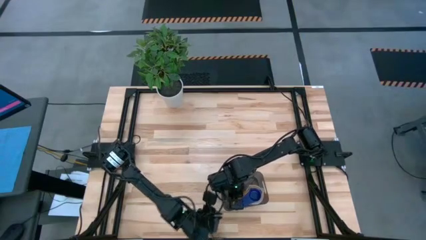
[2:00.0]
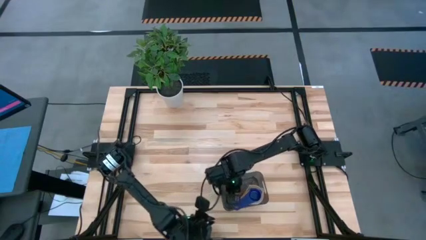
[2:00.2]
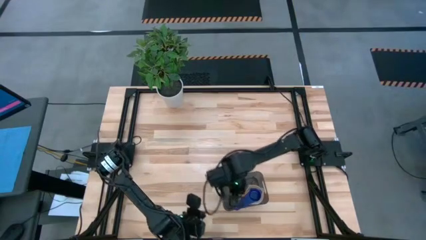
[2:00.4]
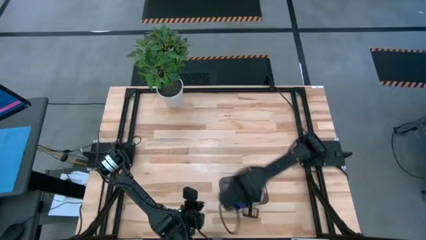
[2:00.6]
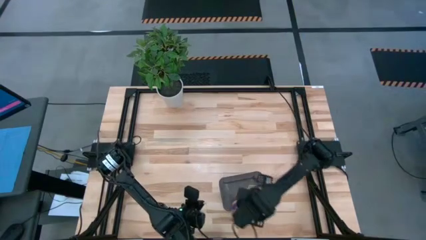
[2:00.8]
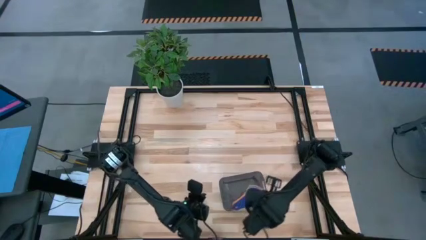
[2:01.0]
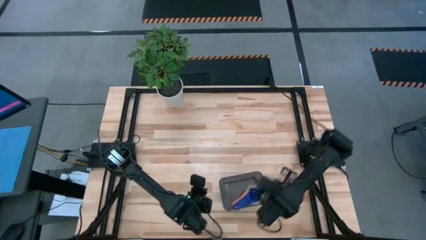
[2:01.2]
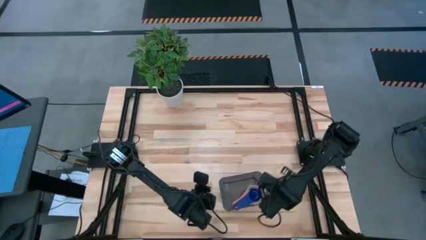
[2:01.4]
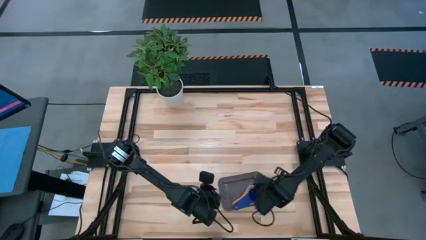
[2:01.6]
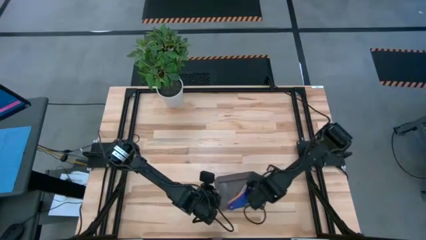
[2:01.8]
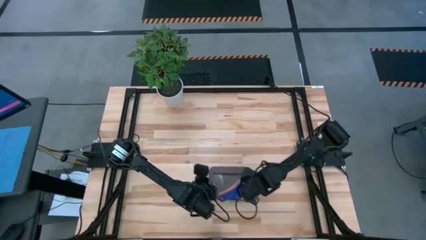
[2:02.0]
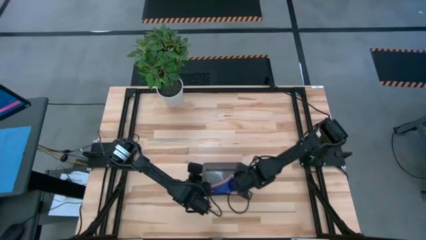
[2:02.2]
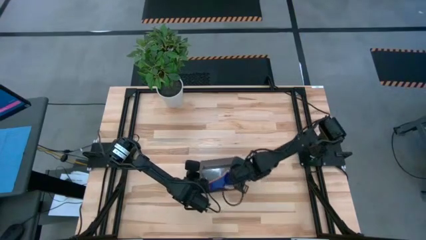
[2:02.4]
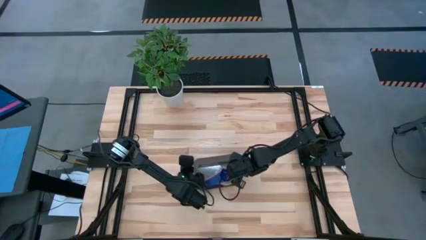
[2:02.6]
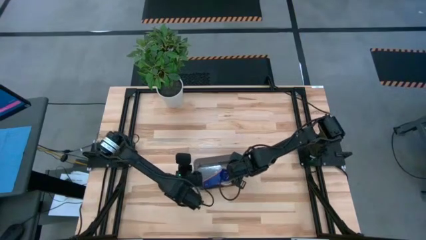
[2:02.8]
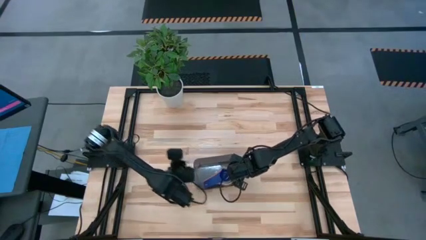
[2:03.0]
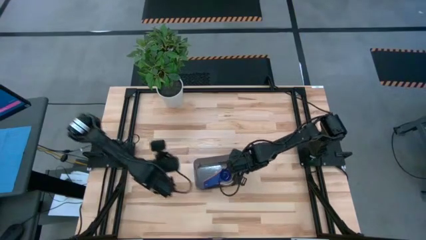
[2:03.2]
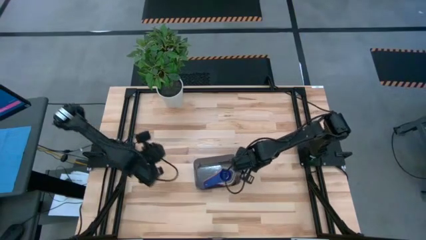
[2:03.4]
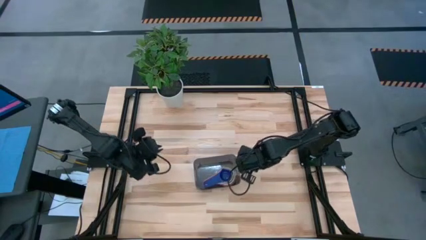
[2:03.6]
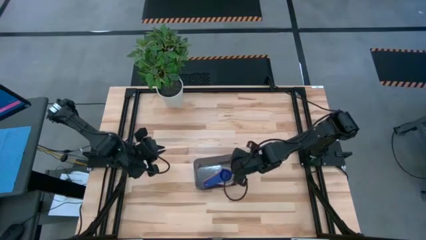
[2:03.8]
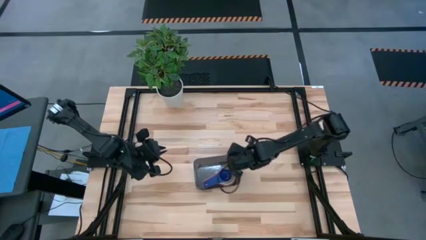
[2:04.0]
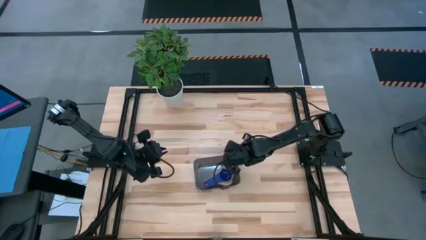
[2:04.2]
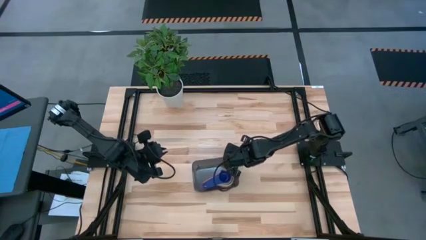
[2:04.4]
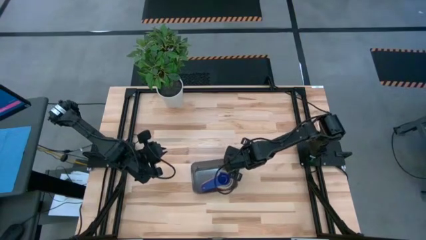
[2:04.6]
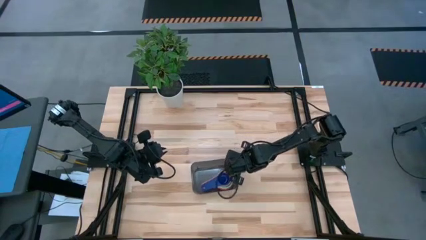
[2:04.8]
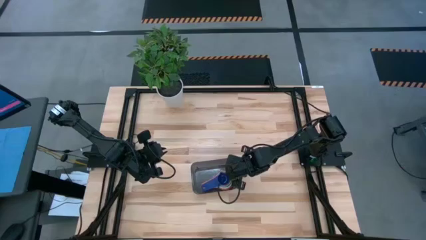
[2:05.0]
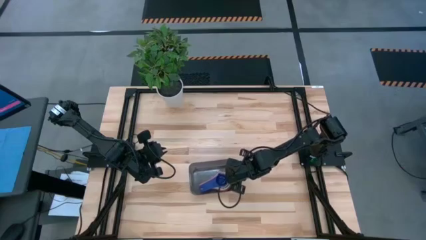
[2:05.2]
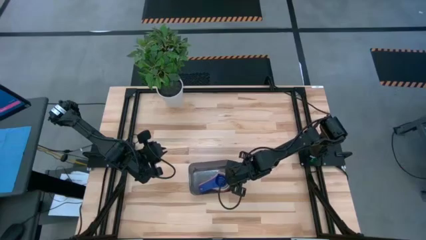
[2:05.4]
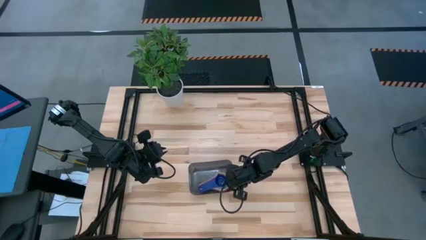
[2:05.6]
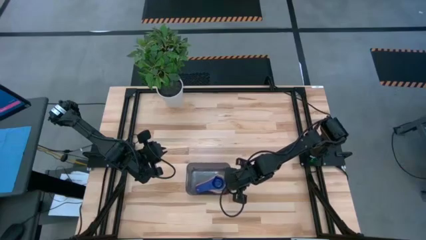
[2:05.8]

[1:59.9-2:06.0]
Task: Nest measuring cups in basket
Move the black bin to the center

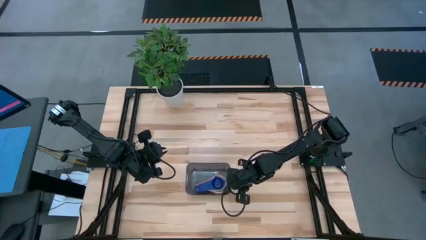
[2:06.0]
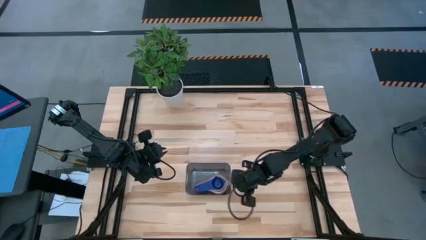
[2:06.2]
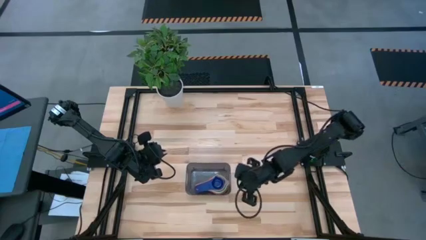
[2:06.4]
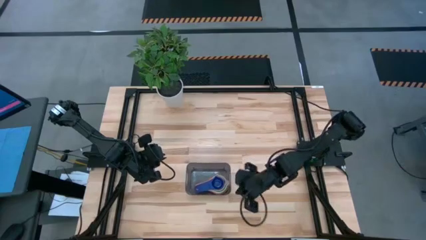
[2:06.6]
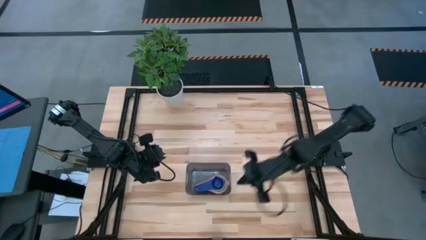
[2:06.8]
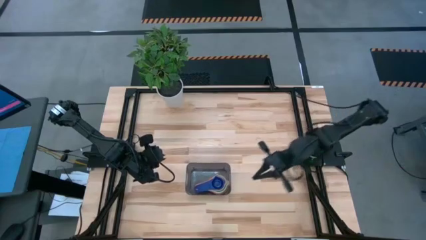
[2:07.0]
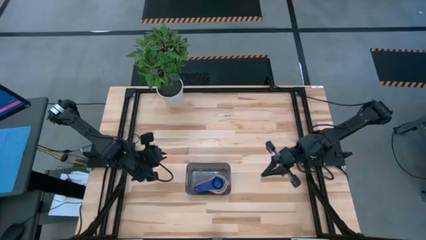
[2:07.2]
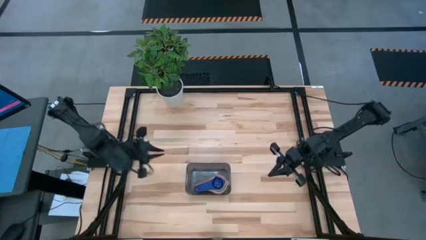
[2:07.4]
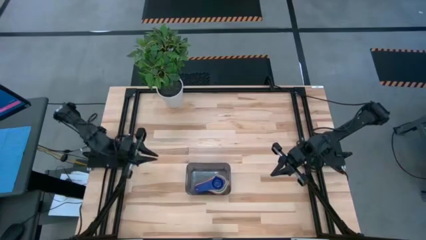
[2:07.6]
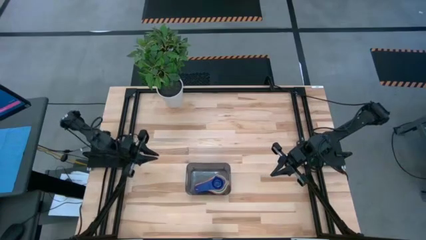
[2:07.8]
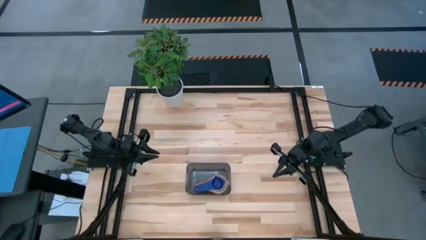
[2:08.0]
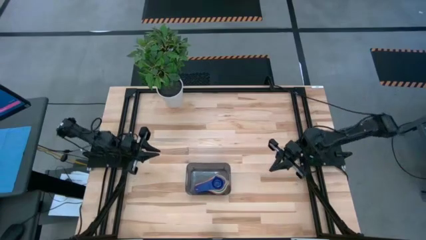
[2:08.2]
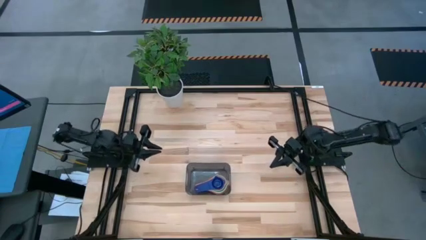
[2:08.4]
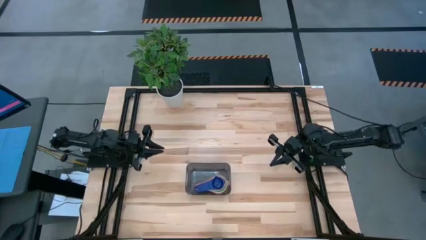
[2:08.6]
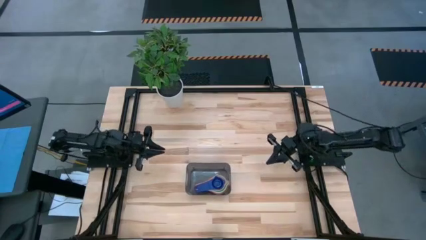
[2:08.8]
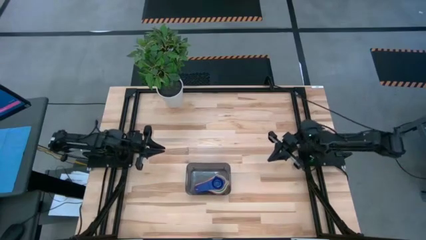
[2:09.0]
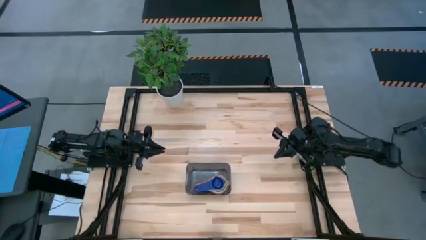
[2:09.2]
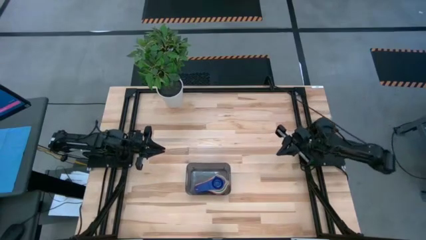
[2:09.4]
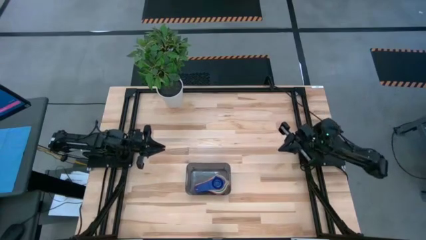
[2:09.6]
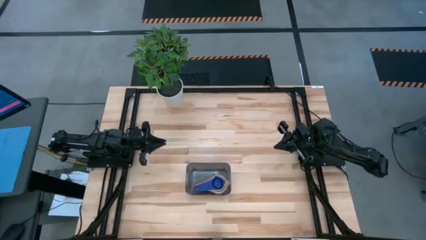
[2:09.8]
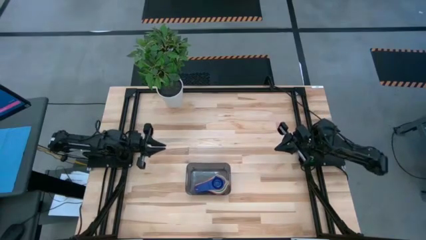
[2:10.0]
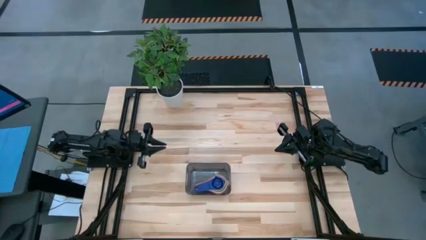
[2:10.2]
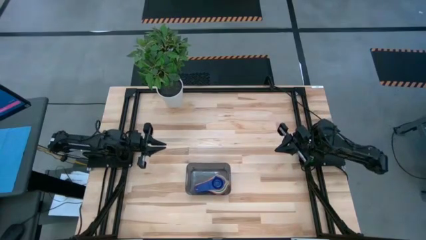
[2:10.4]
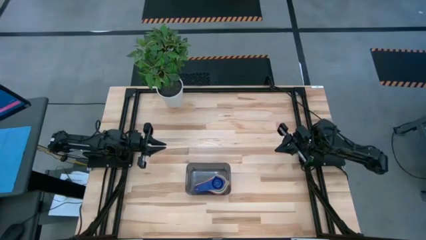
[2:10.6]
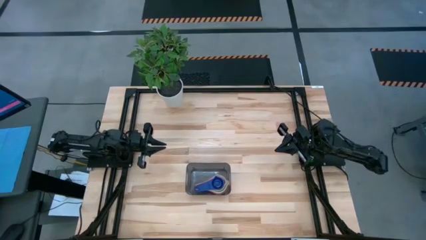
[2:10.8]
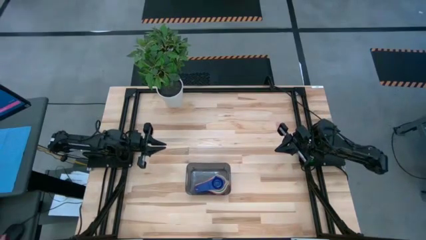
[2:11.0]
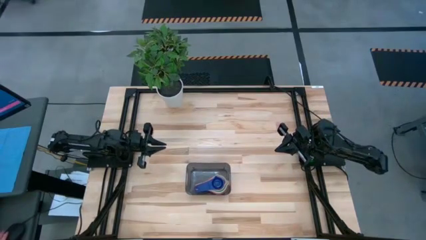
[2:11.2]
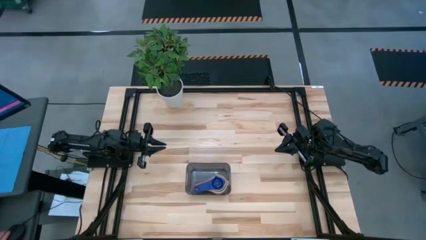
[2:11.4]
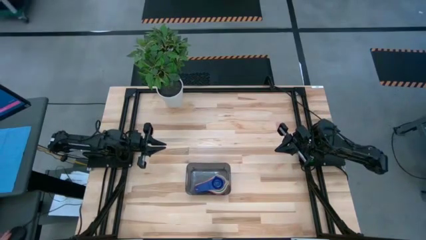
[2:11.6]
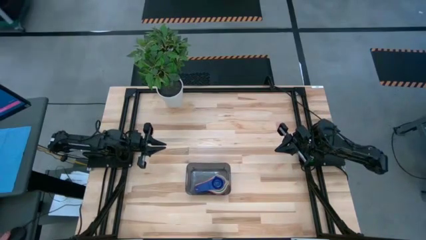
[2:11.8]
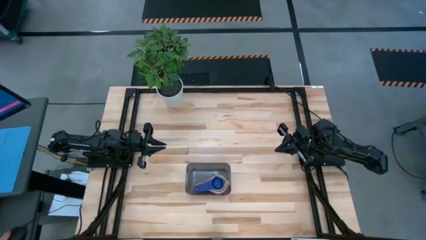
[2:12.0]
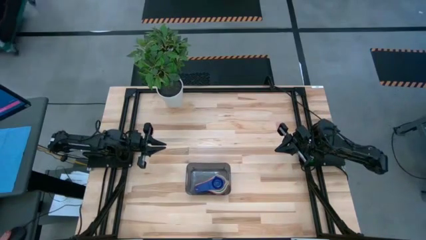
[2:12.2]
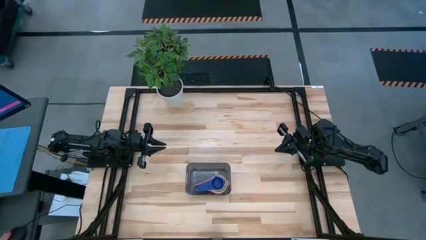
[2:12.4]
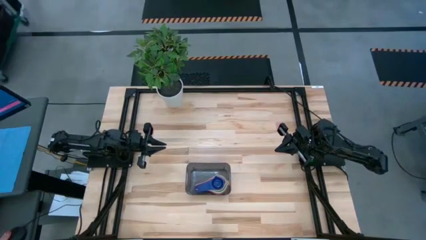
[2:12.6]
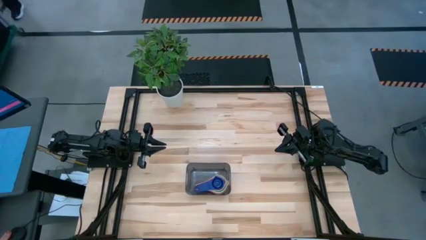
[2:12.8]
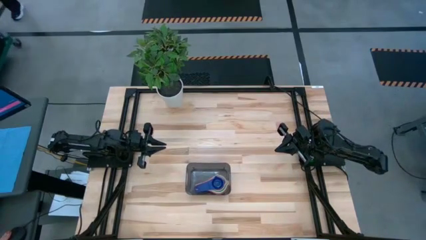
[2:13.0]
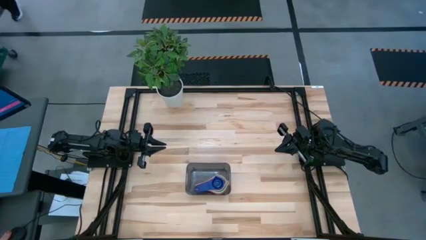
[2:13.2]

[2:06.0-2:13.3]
Return to Home Position
